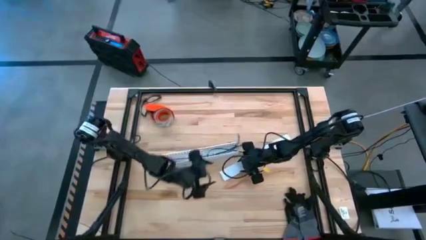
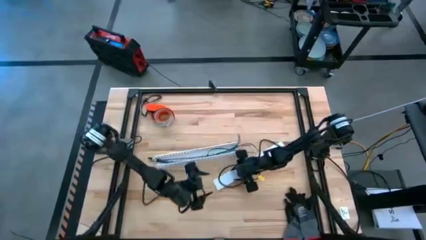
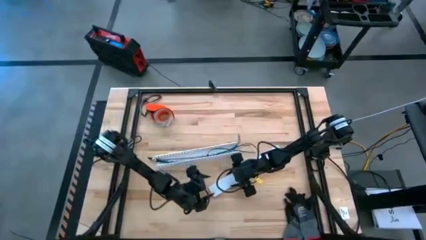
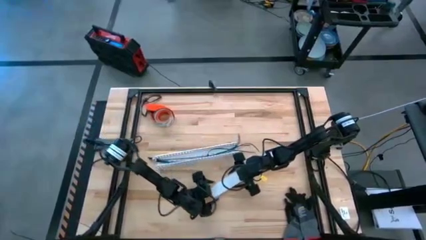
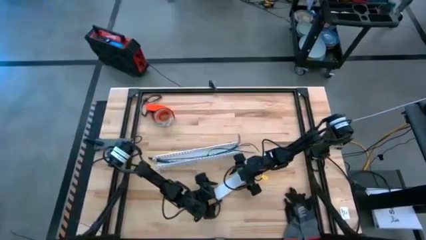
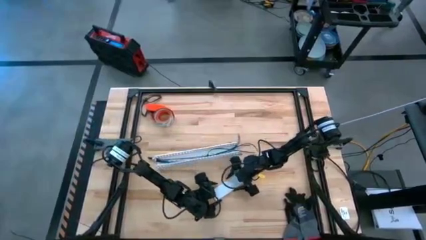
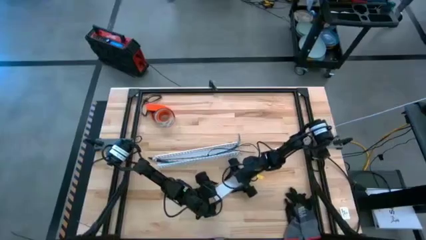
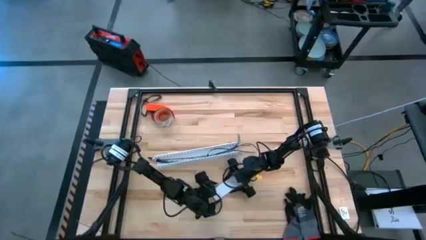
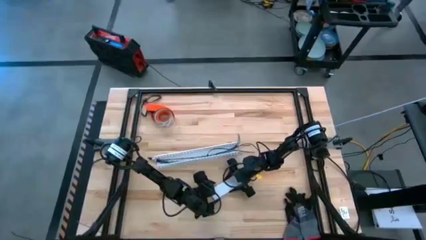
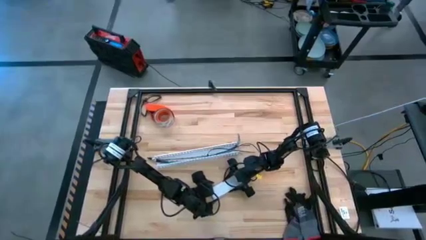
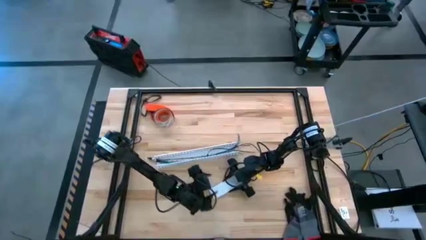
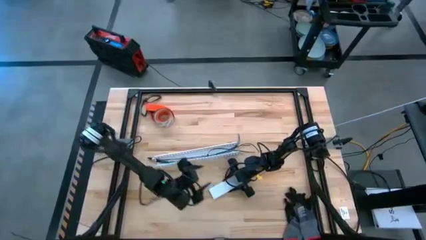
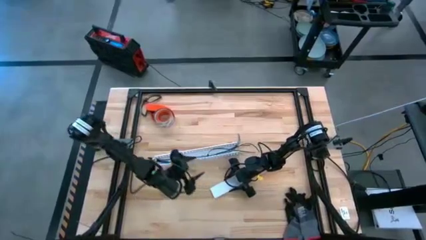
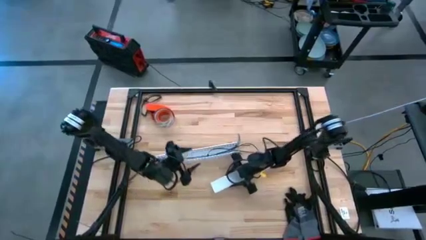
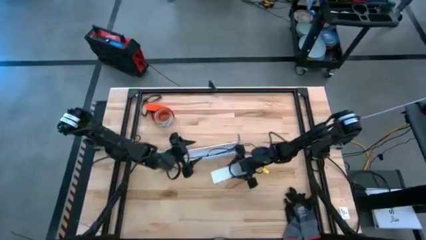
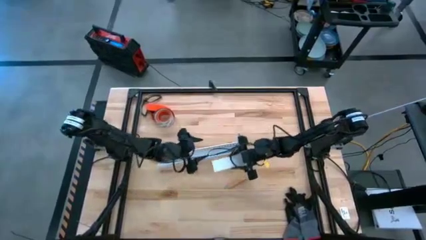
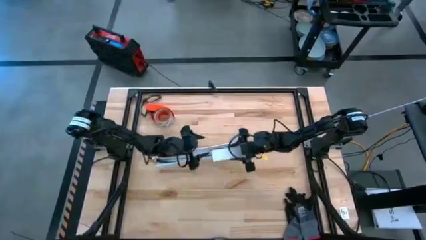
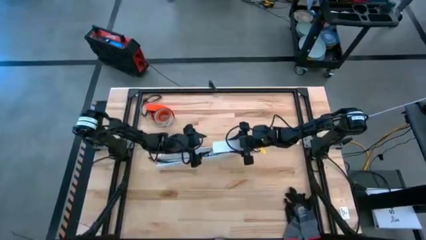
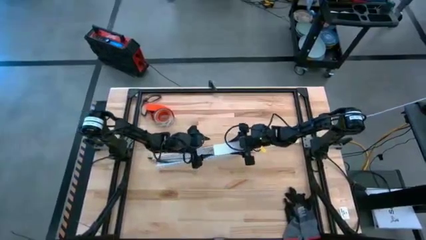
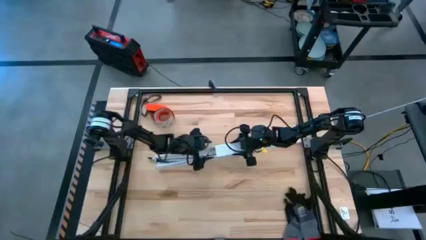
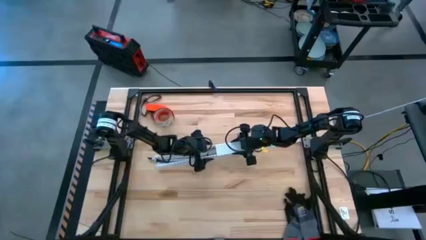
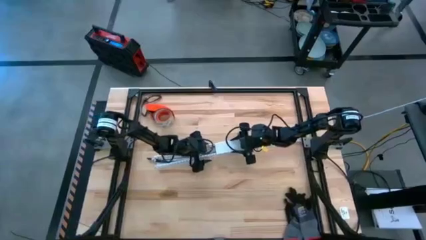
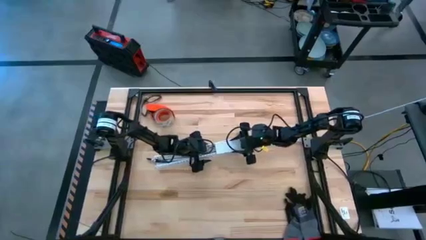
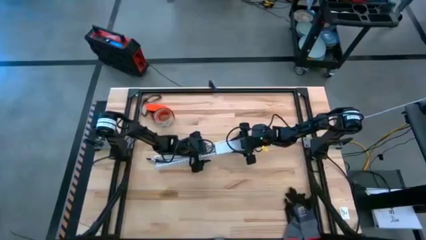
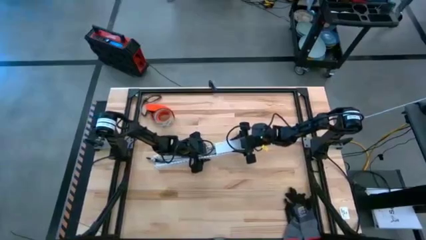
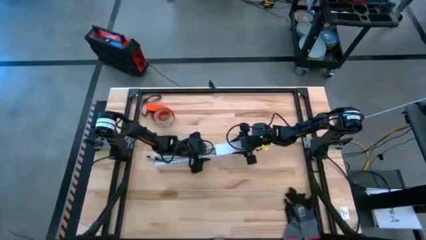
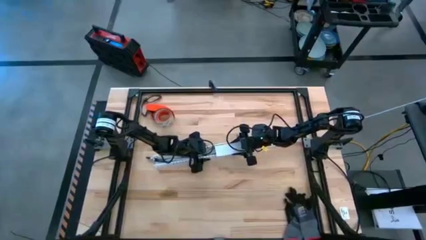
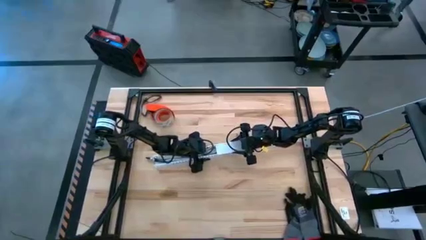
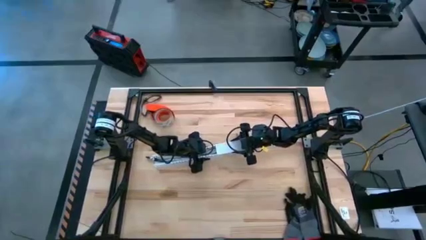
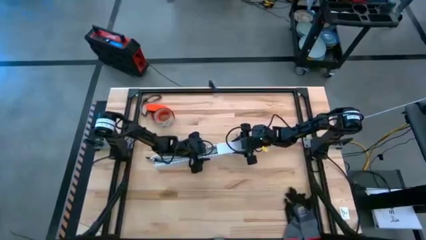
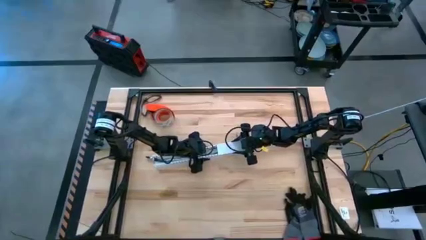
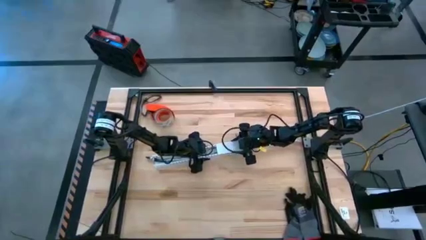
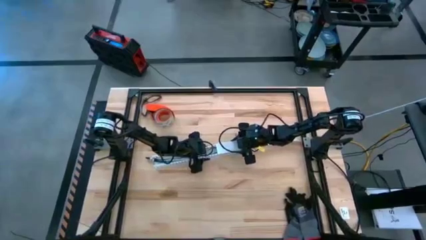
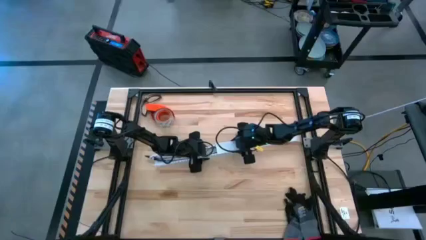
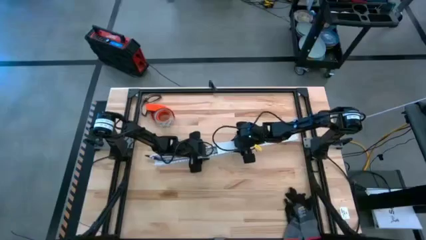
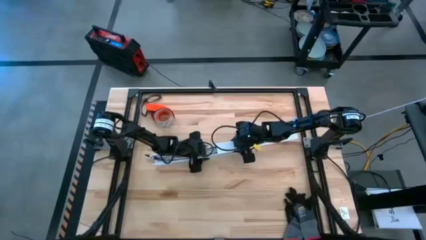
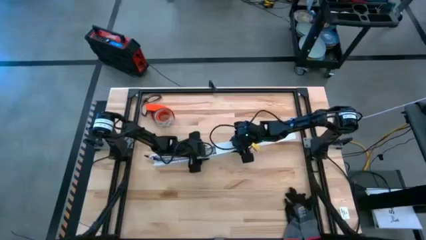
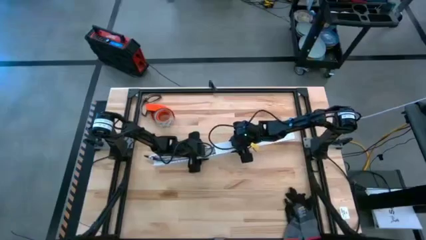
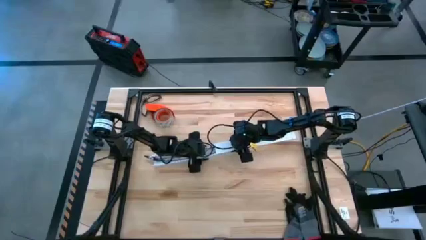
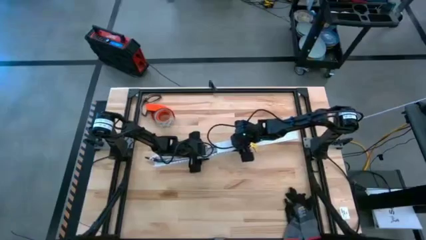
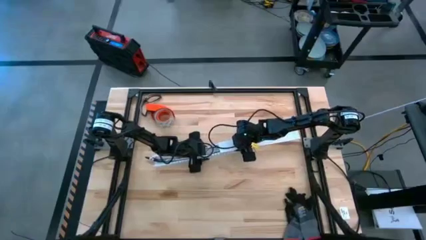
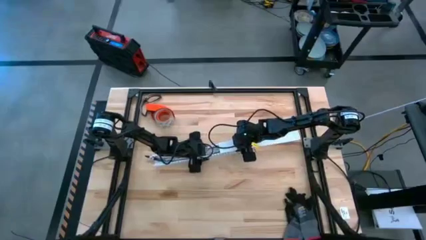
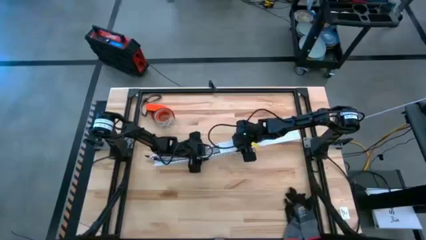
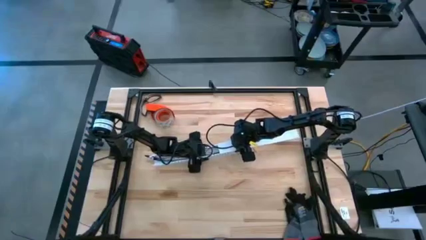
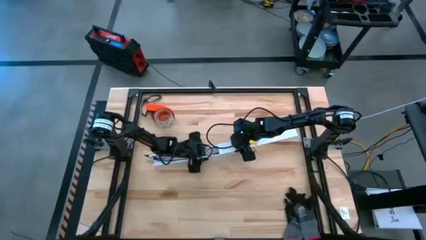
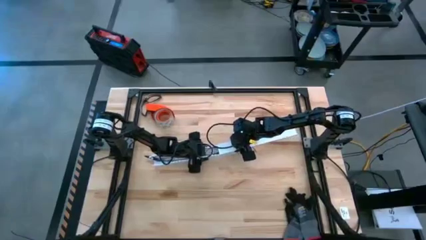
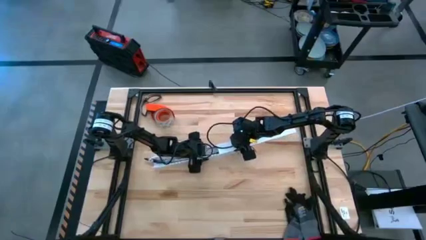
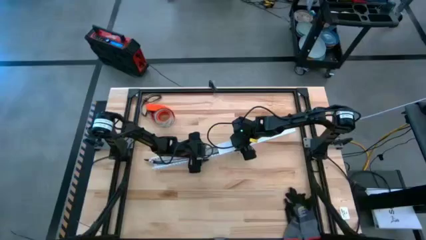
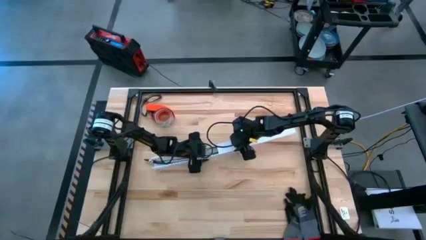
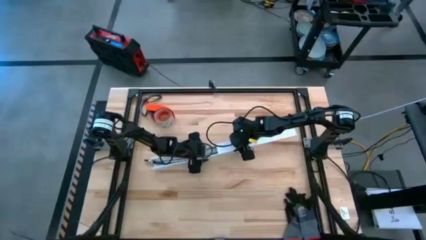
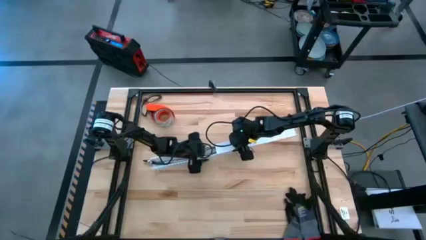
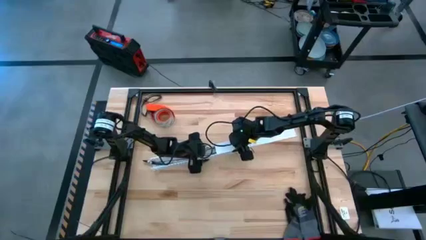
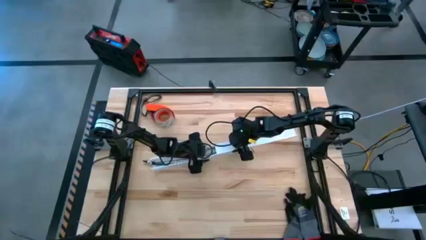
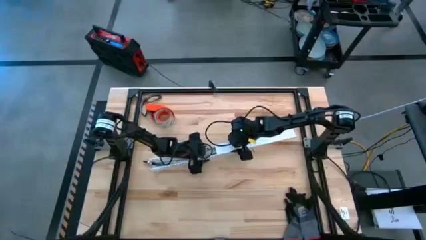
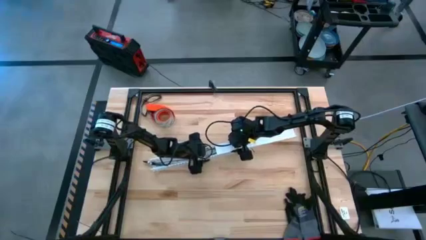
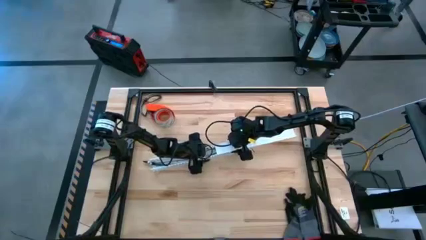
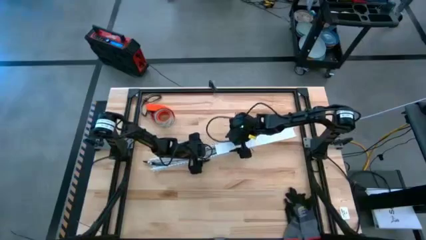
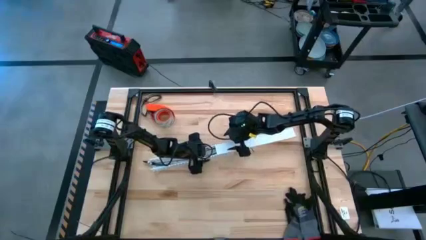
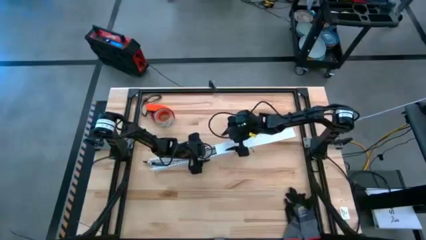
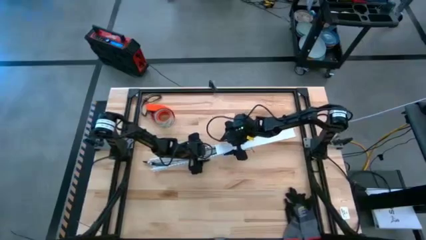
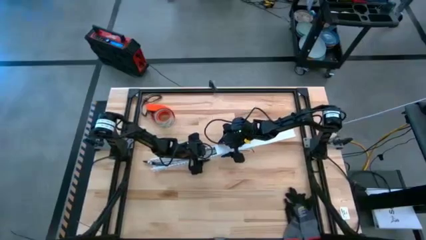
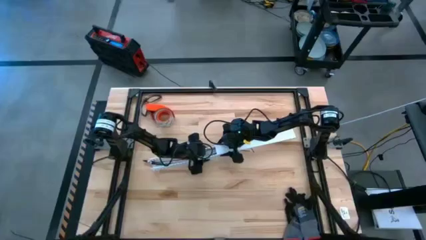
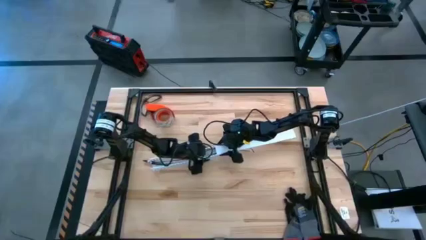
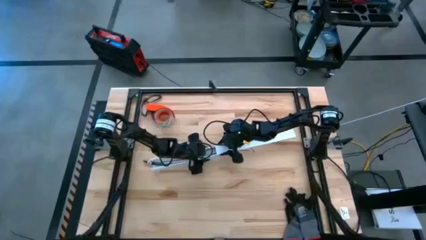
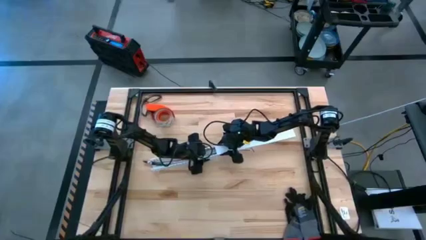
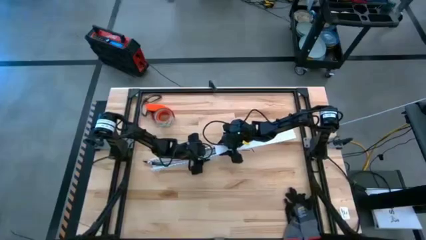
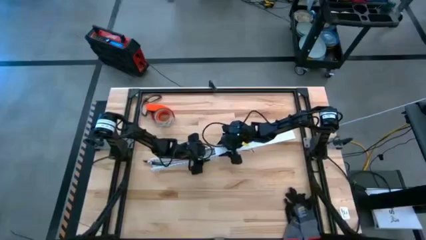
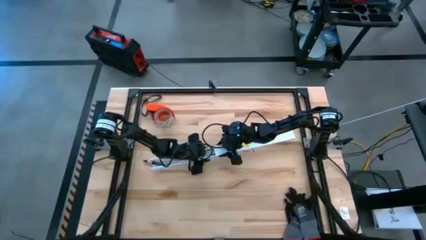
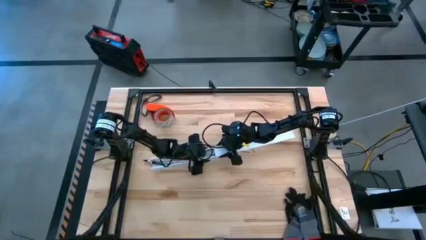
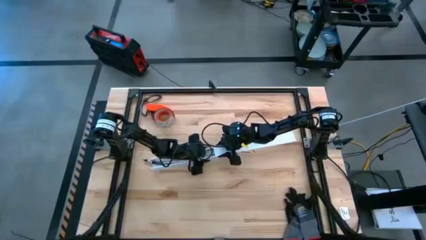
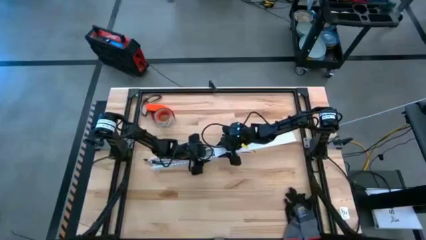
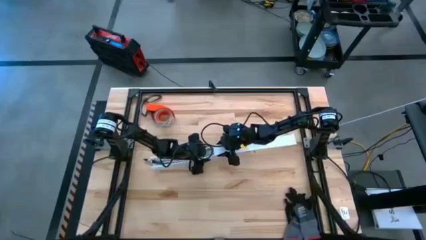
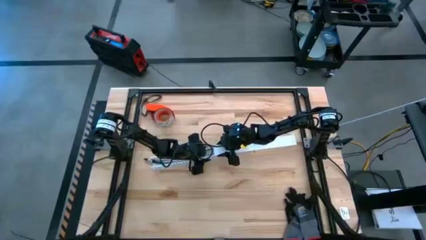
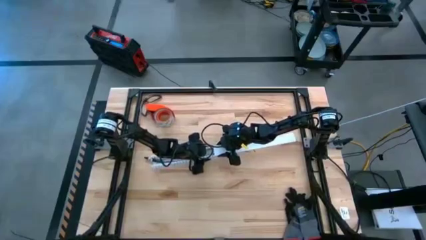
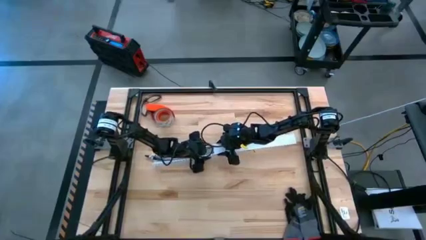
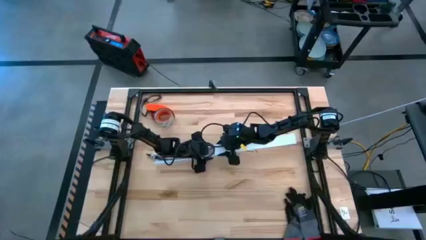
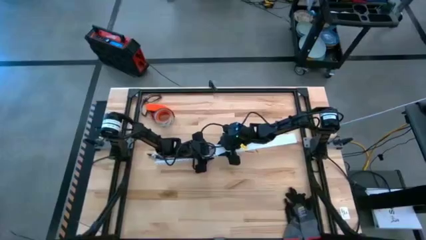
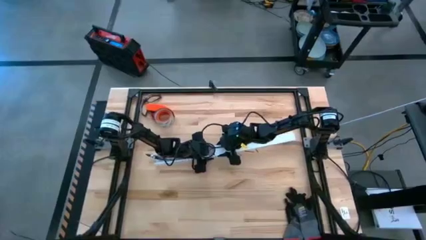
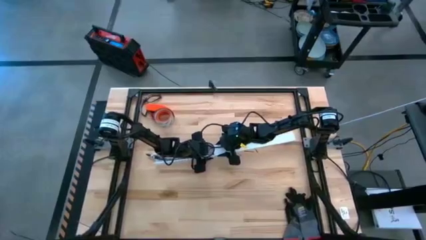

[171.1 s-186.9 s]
Task: Ziptie cables
Close the white cable duct
